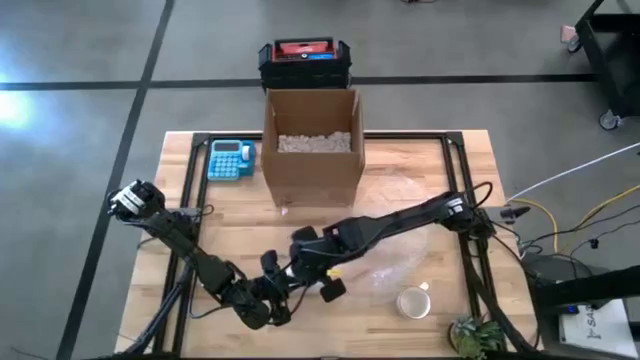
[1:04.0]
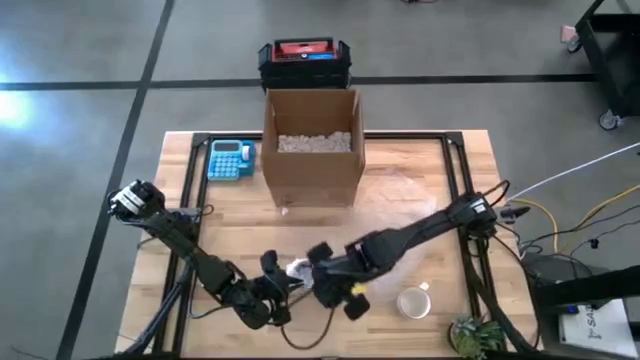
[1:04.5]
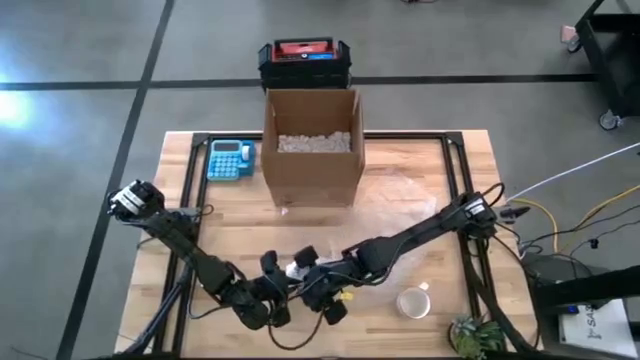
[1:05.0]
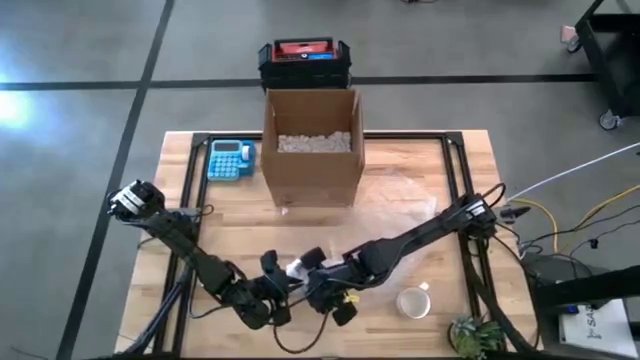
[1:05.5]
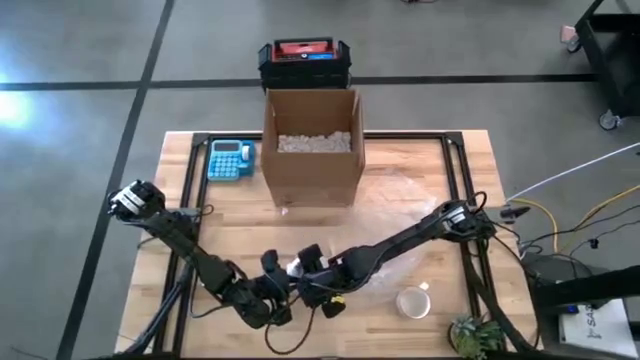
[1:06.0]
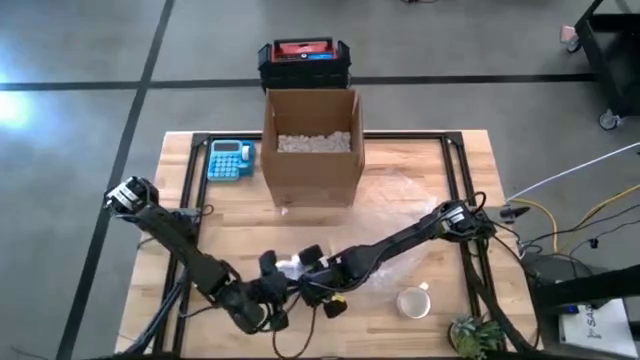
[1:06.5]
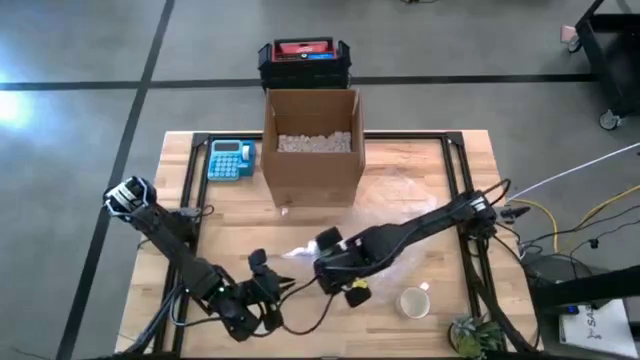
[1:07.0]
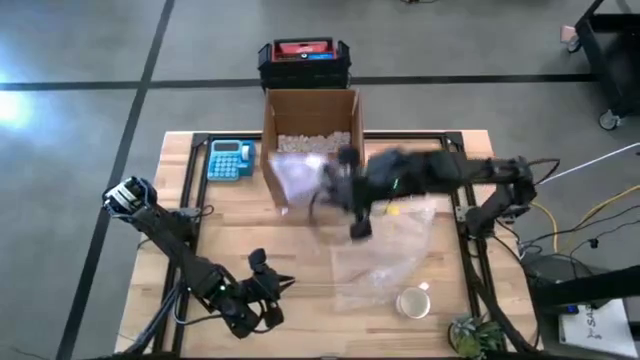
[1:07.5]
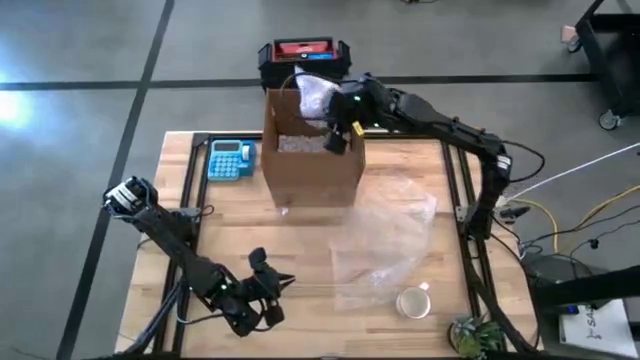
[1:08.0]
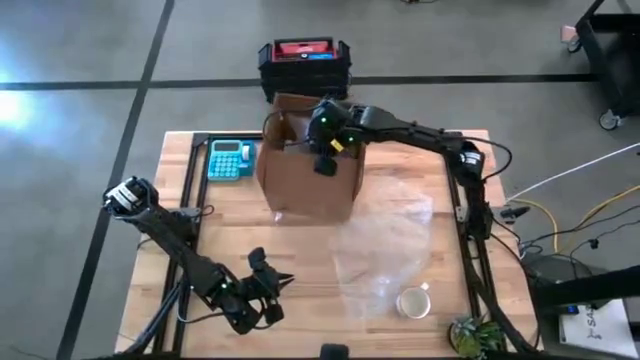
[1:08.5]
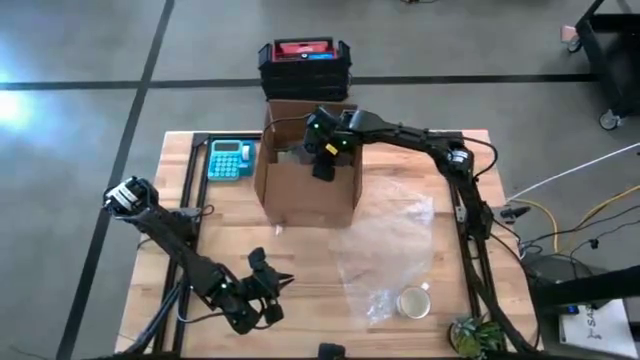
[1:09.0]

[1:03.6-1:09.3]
Task: wrap mug
Put the wrapped purple mug into the cardboard box

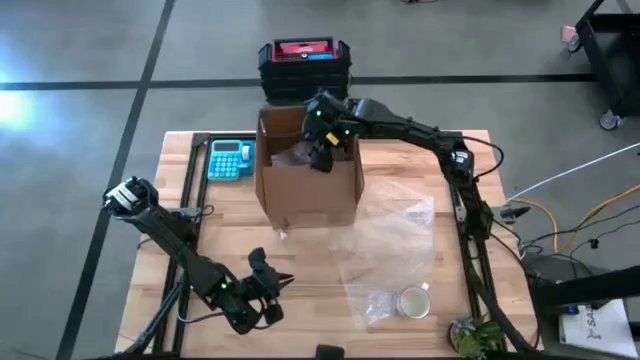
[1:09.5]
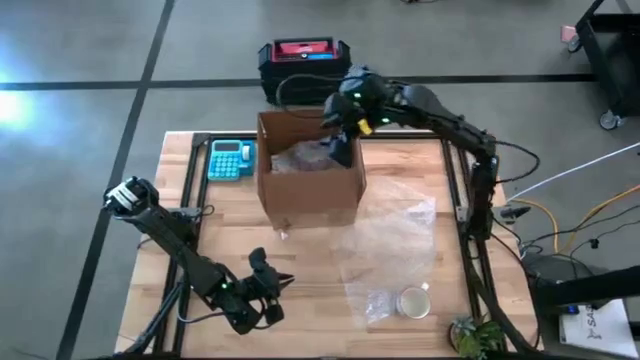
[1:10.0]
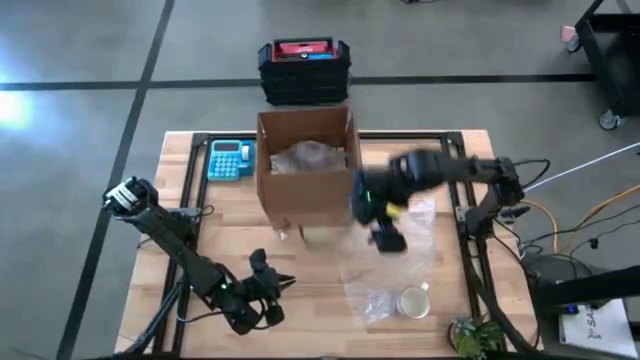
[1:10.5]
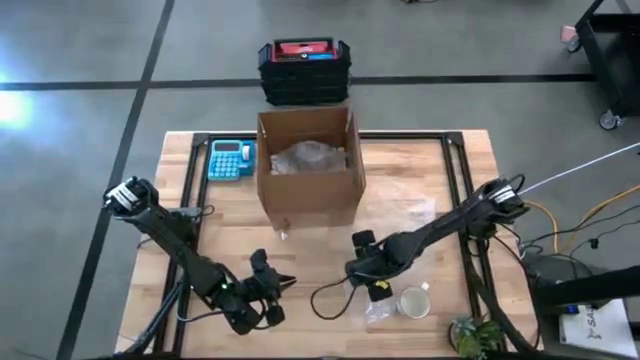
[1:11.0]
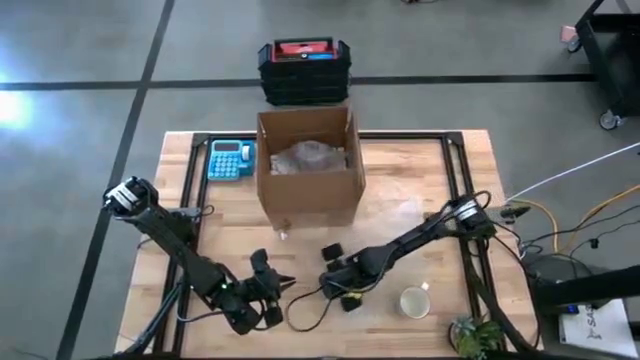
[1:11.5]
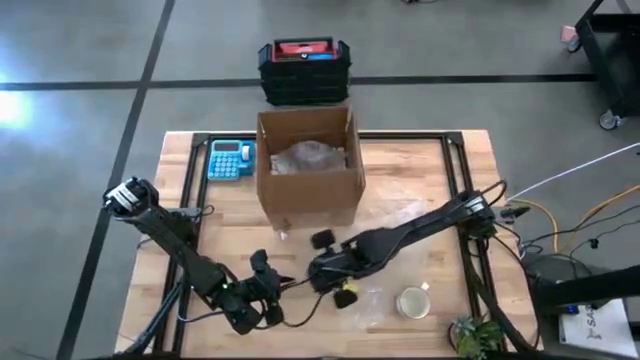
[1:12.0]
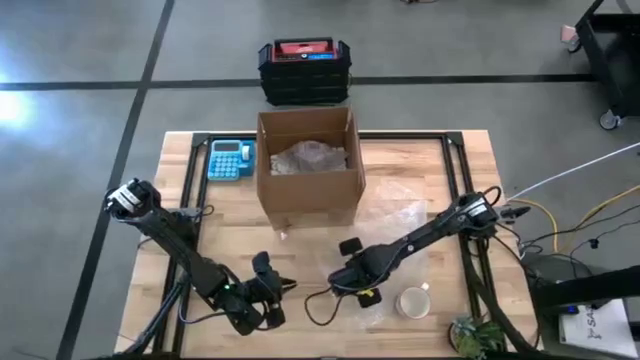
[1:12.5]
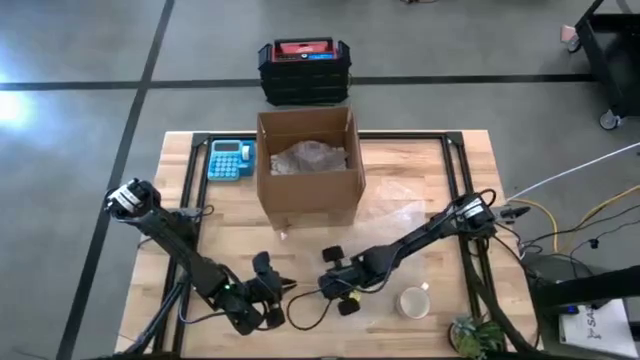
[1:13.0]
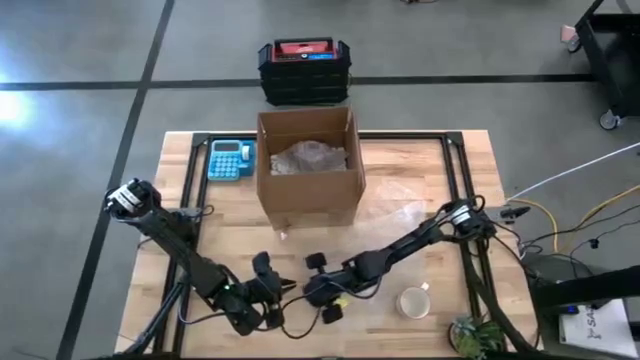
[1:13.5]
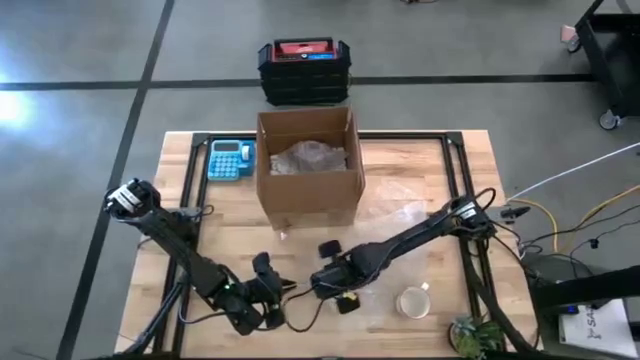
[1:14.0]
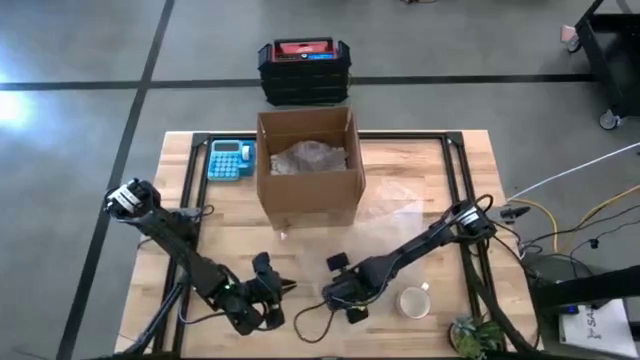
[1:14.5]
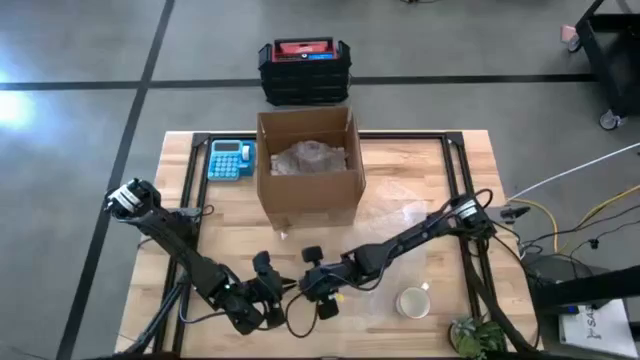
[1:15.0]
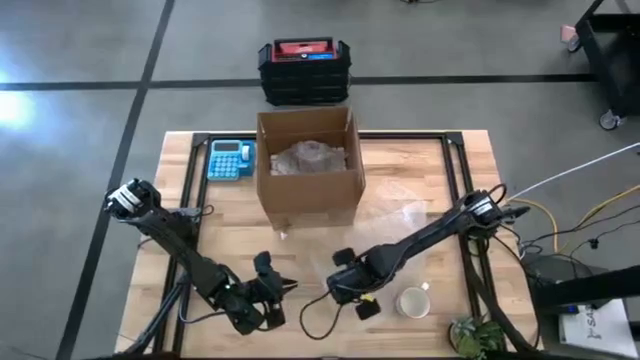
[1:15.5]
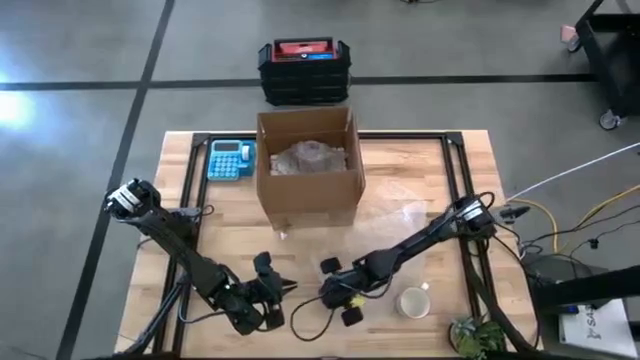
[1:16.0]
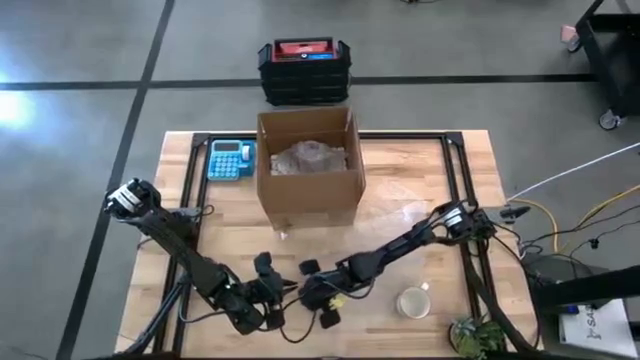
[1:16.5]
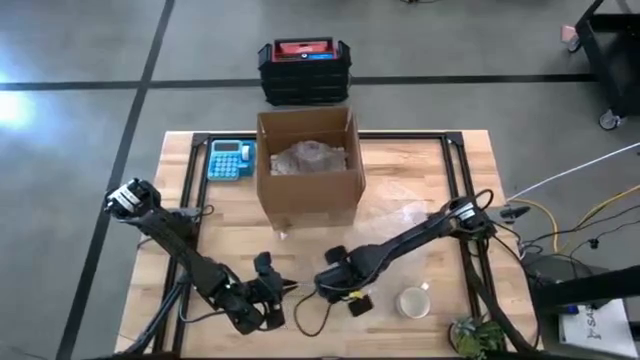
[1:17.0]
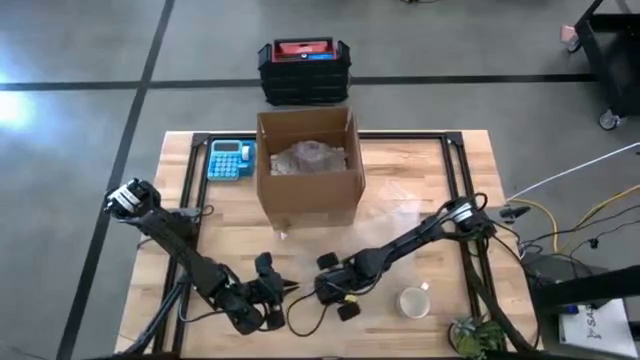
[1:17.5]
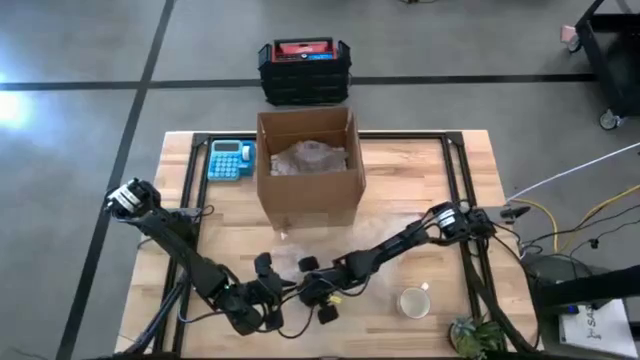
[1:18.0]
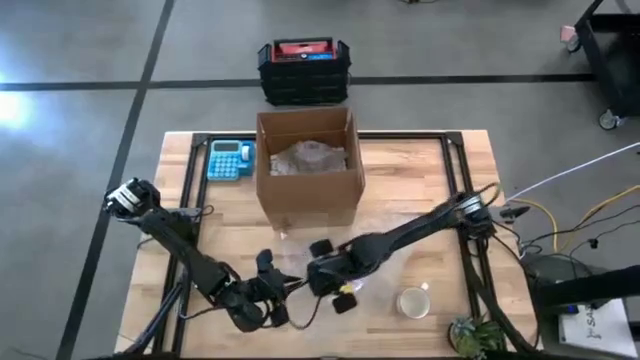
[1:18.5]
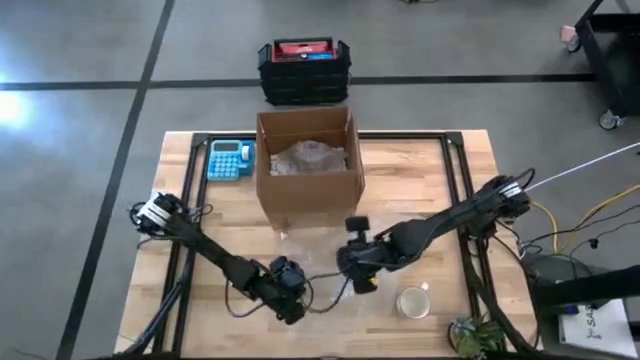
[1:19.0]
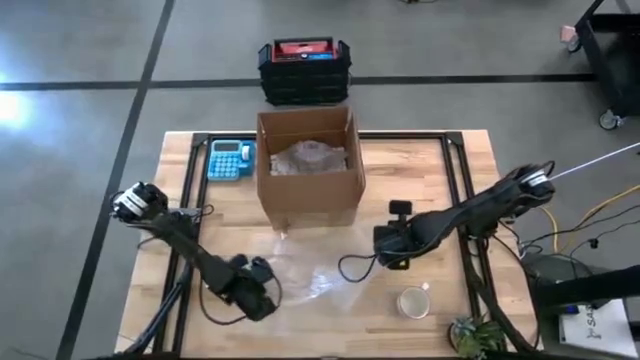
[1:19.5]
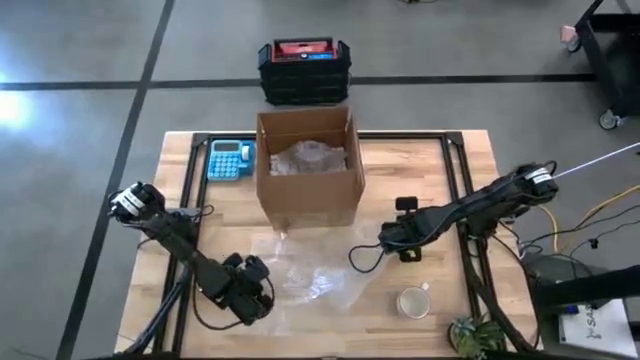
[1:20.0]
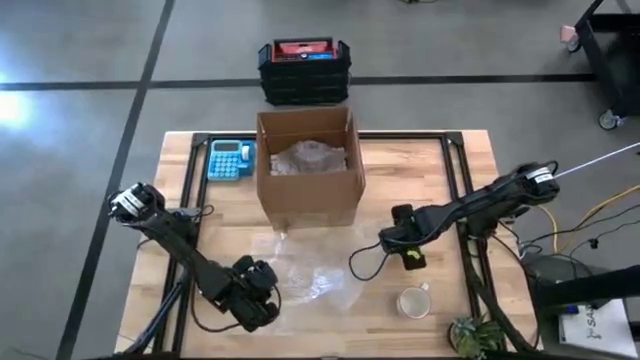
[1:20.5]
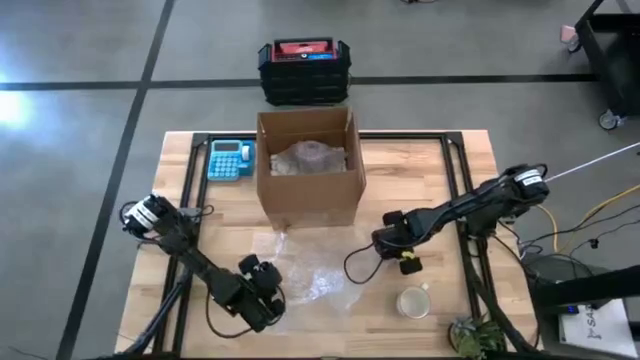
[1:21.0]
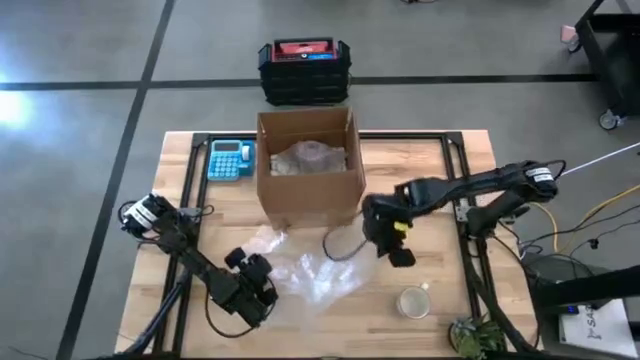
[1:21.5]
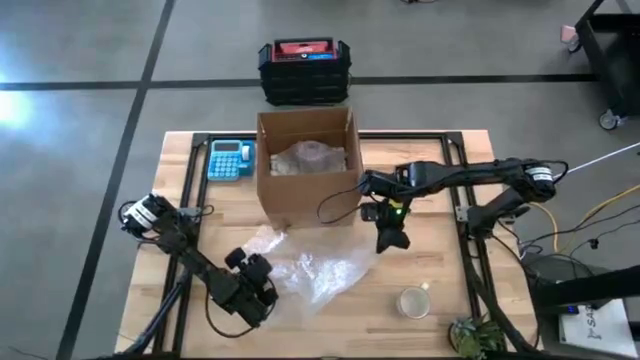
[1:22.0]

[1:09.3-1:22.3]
Prepare the transparent bubble wrap to wrap the gray mug

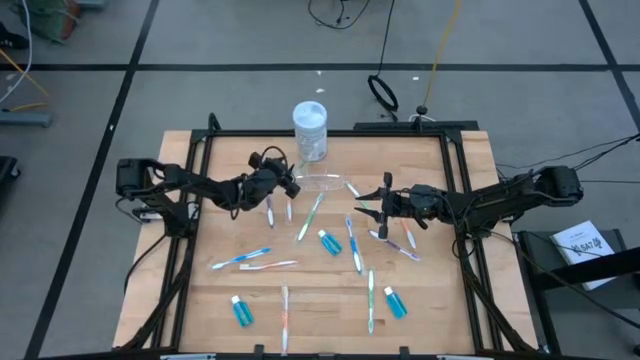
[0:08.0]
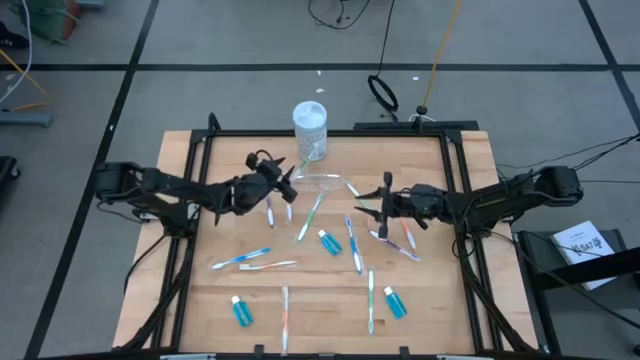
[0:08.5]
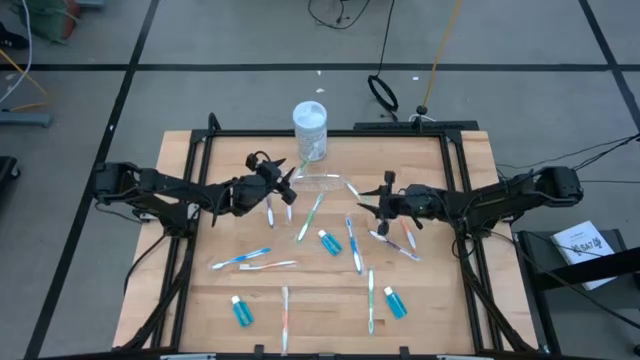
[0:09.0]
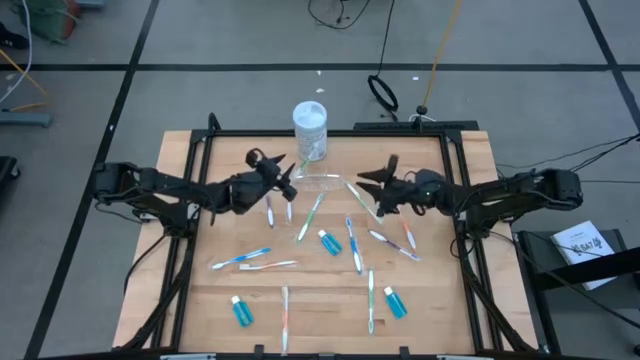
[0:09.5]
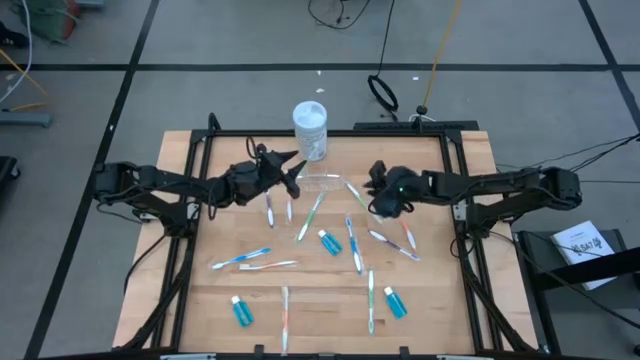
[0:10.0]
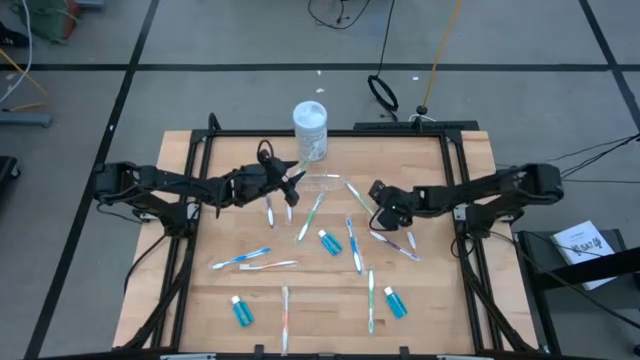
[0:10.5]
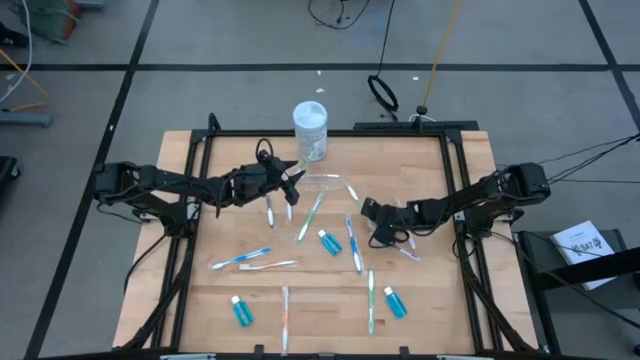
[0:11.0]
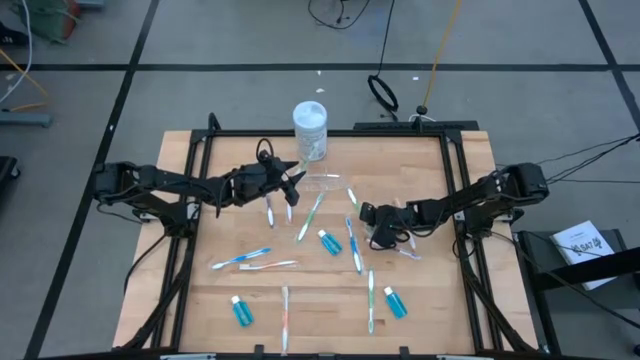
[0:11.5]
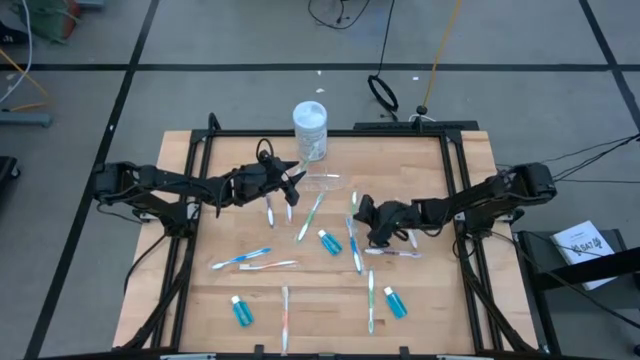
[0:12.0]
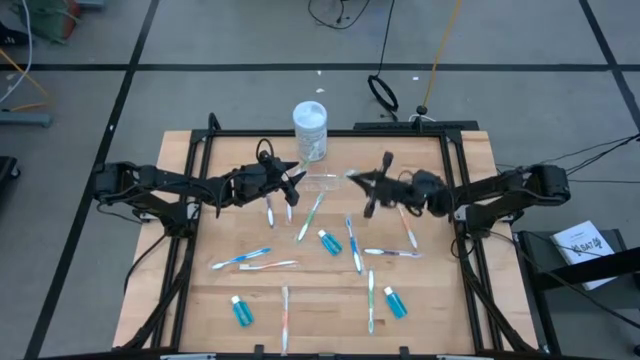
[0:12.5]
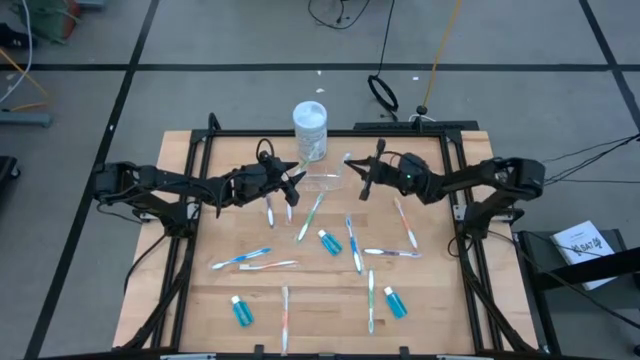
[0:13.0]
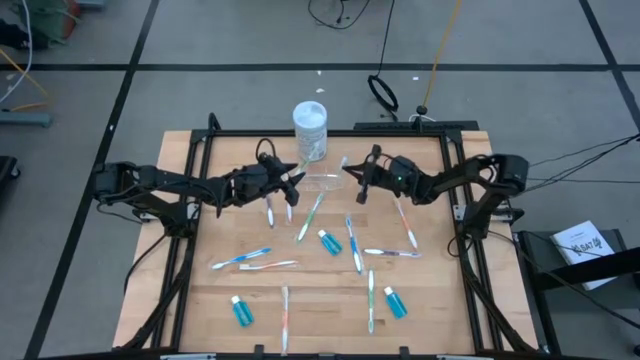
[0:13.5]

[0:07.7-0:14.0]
Task: Pick & Place toothbrushing station
Put the green toothbrush into the transparent organizer
